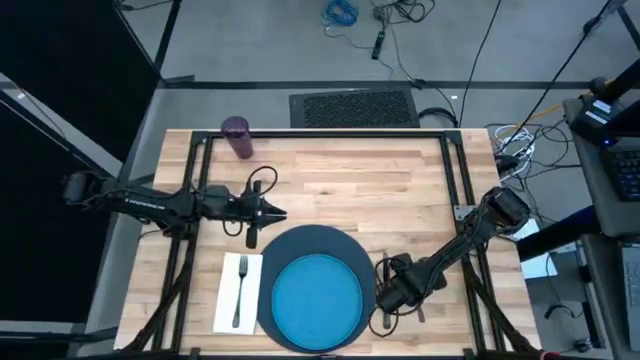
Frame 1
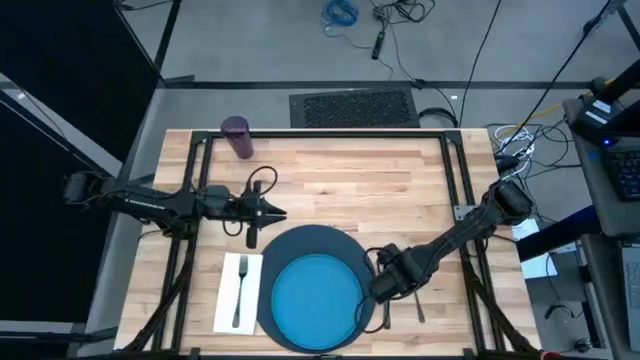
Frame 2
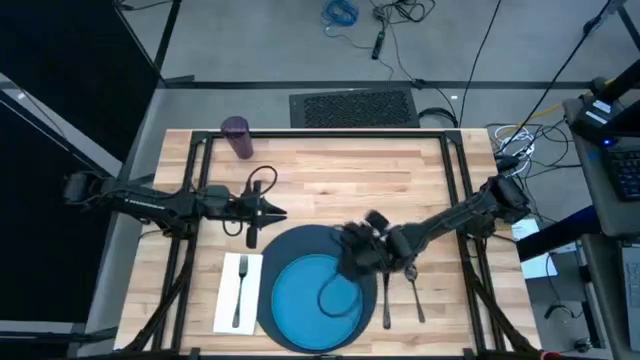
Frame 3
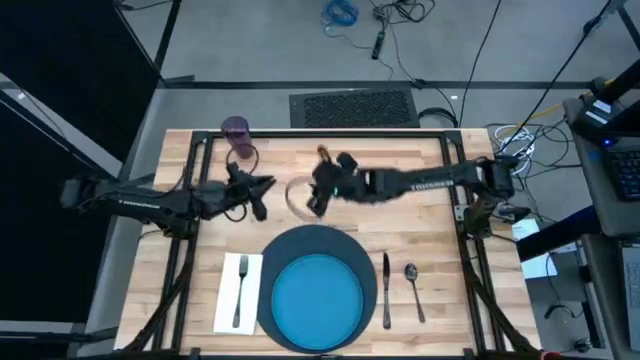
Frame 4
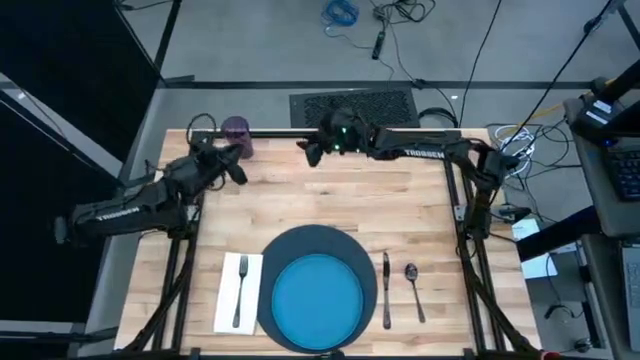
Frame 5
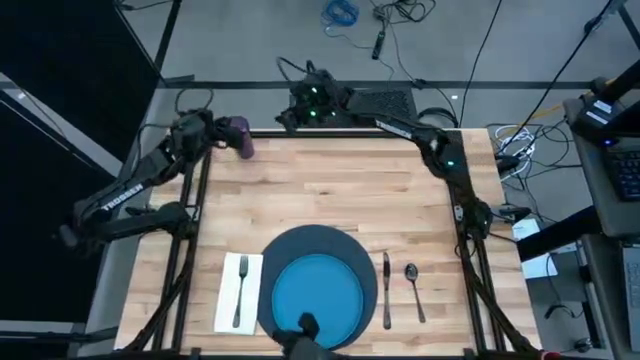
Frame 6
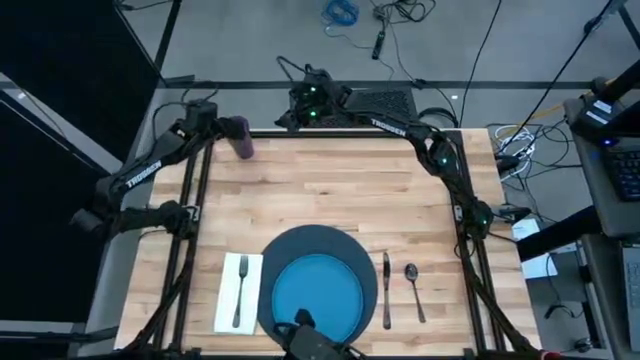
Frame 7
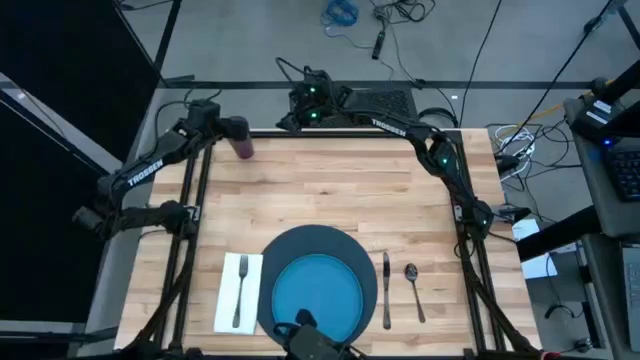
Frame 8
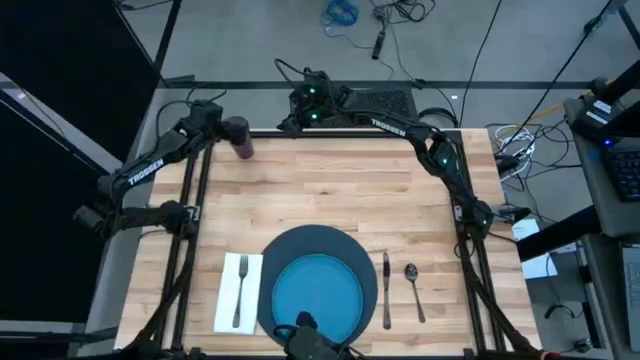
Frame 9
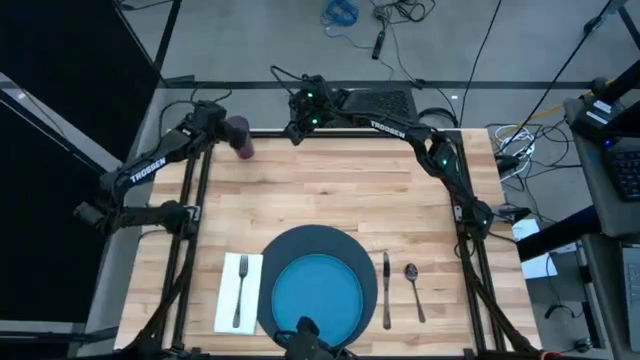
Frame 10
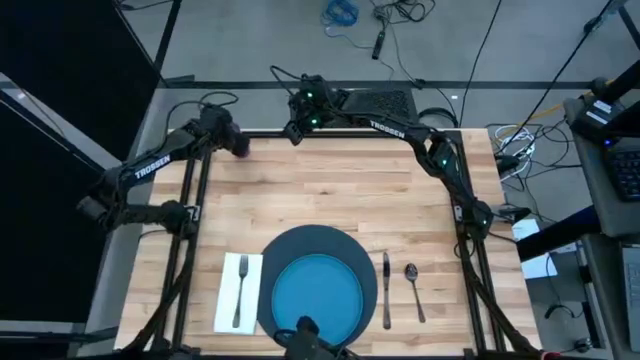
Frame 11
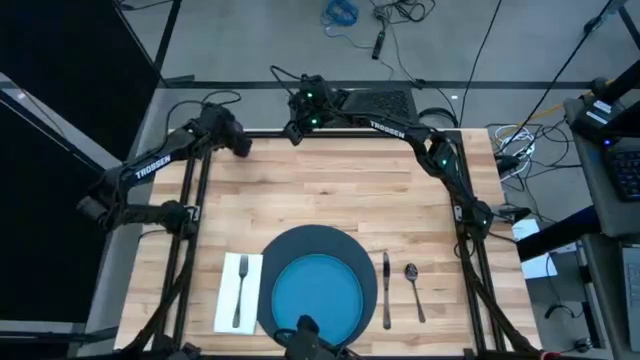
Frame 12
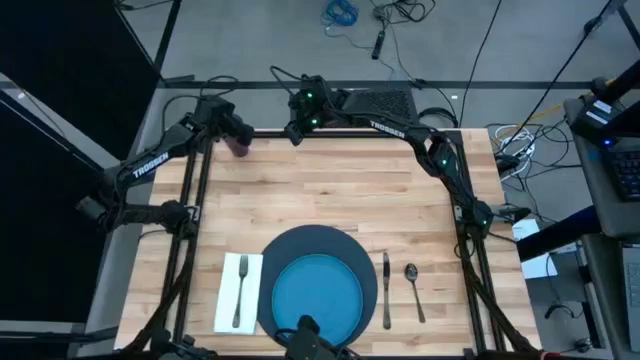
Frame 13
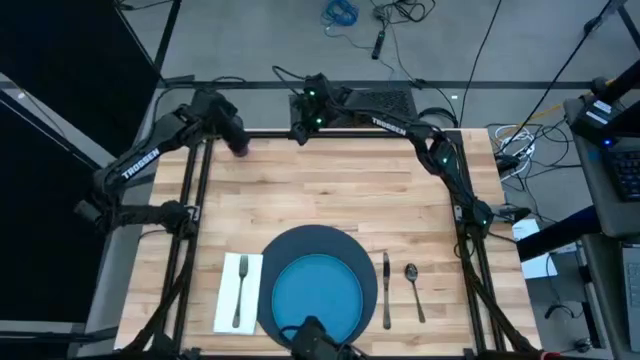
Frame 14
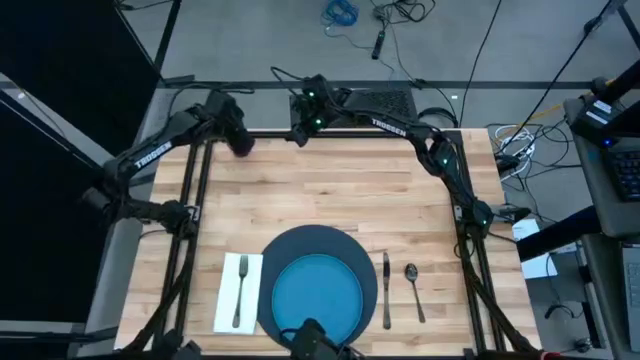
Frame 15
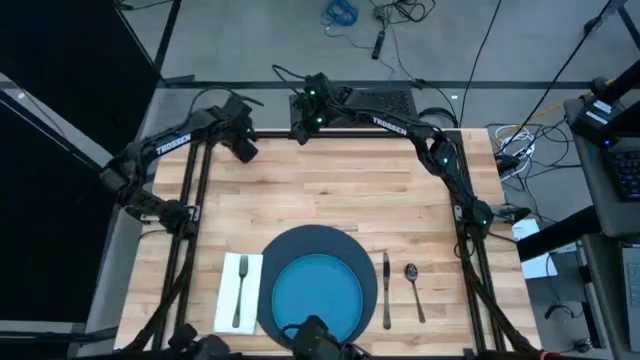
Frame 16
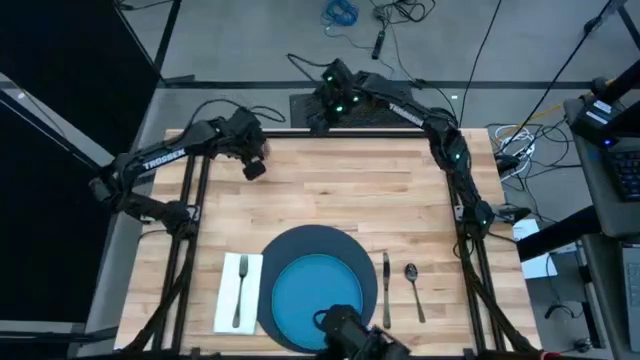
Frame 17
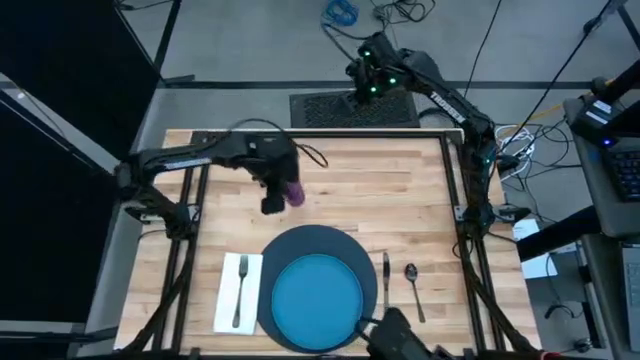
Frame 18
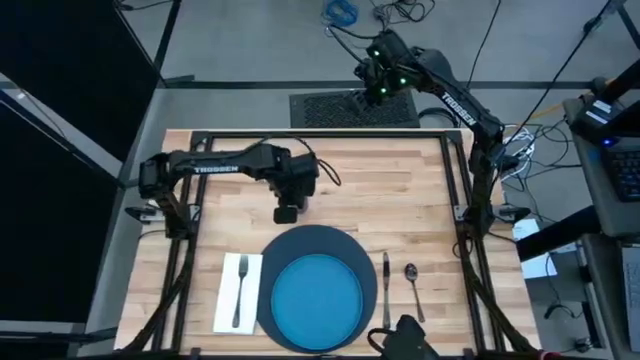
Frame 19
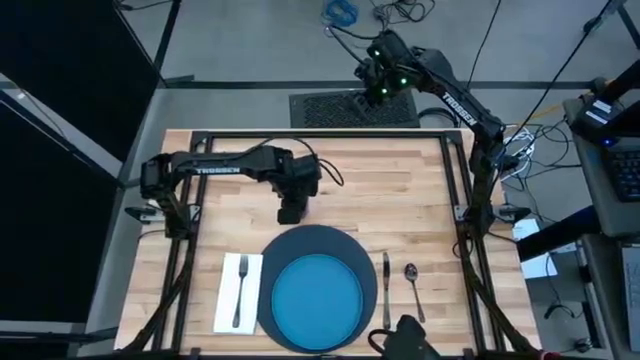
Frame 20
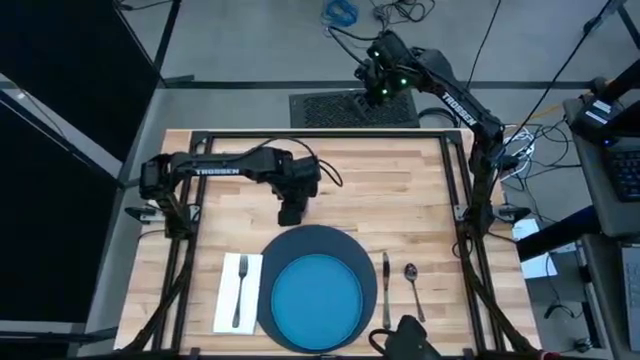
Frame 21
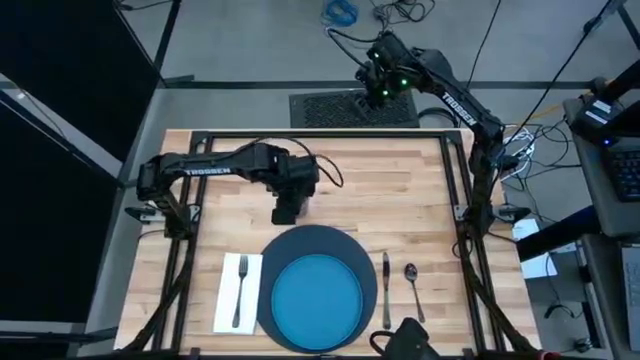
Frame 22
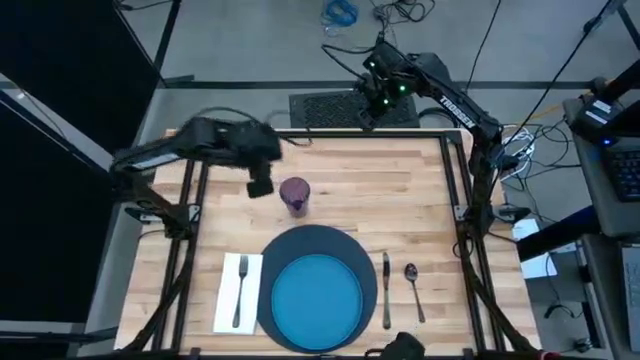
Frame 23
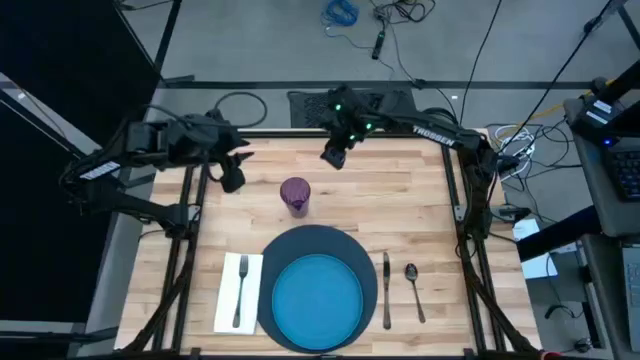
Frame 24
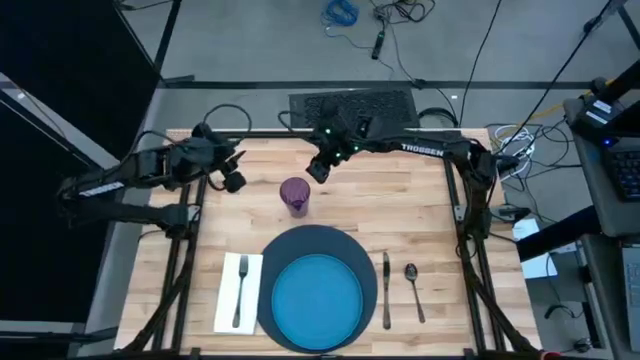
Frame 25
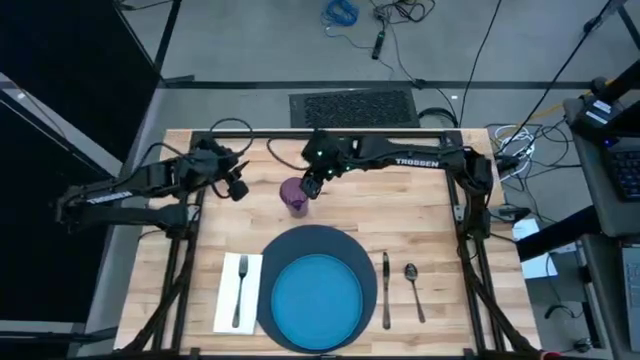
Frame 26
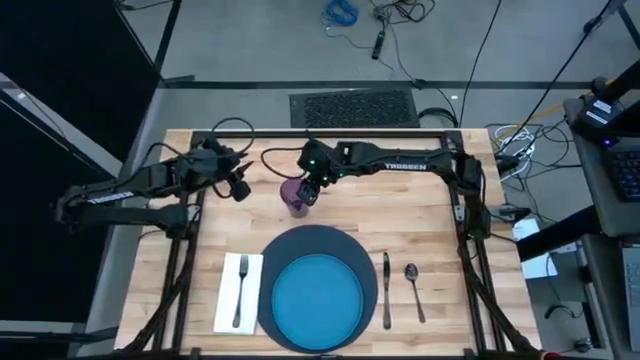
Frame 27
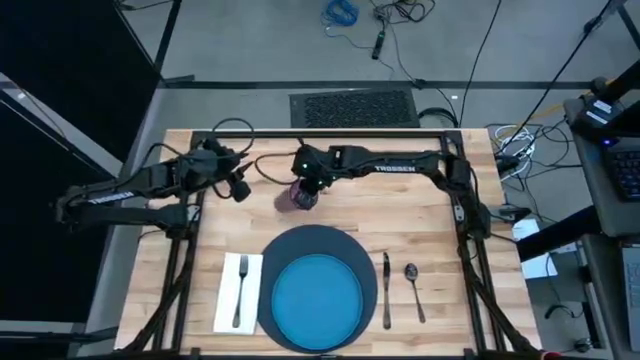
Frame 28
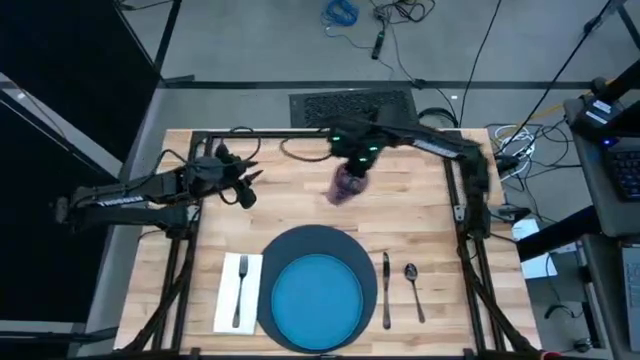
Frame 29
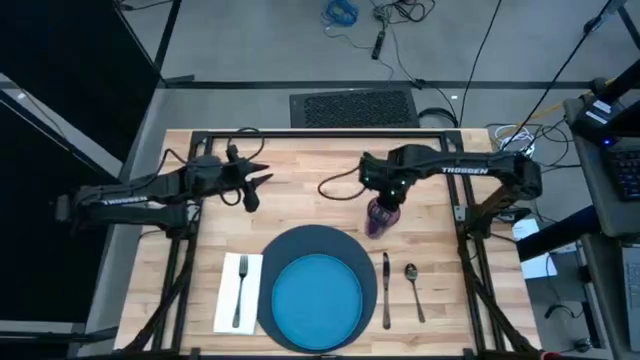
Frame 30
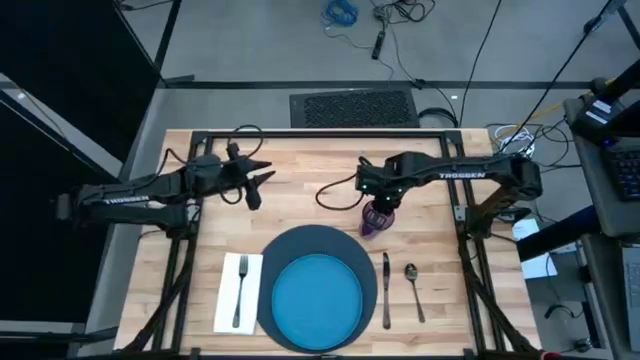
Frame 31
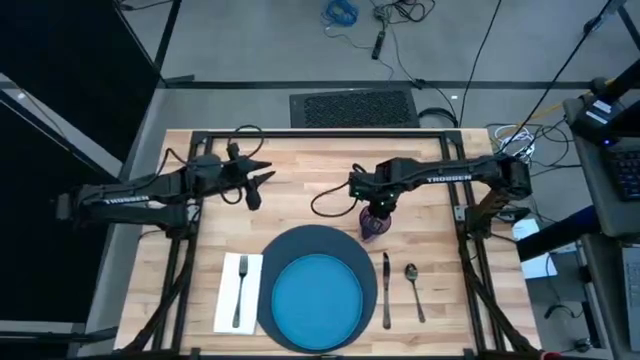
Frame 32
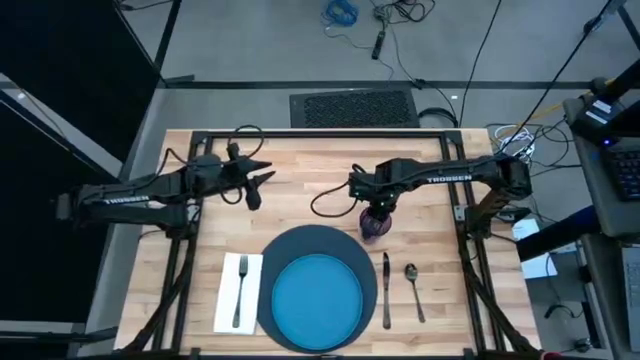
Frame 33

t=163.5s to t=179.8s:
Task: Set table place
Put the violet cup on the middle right of the table

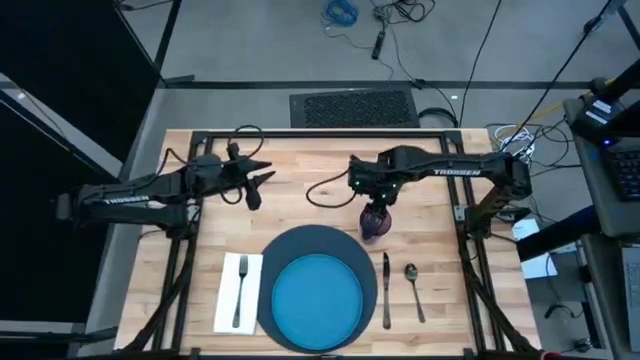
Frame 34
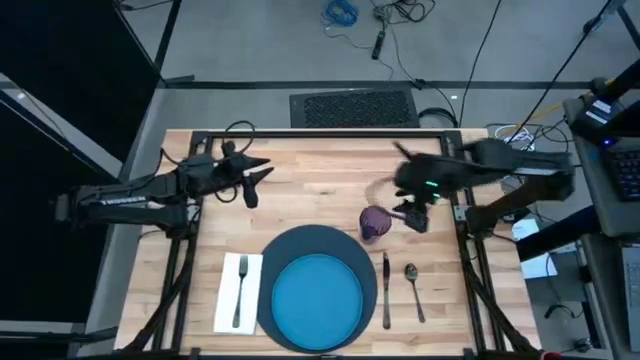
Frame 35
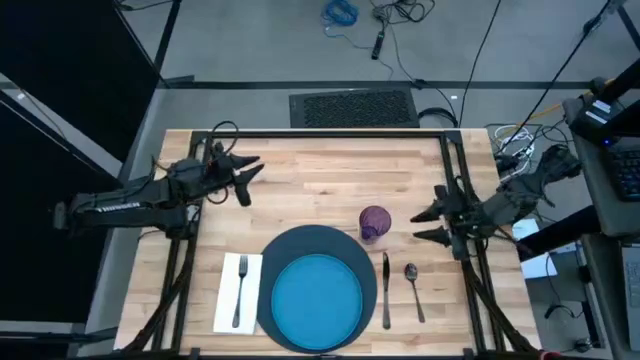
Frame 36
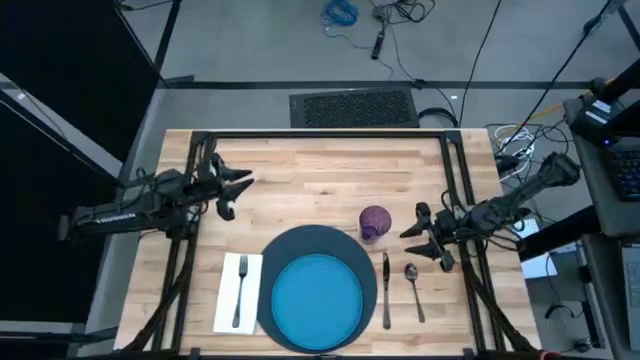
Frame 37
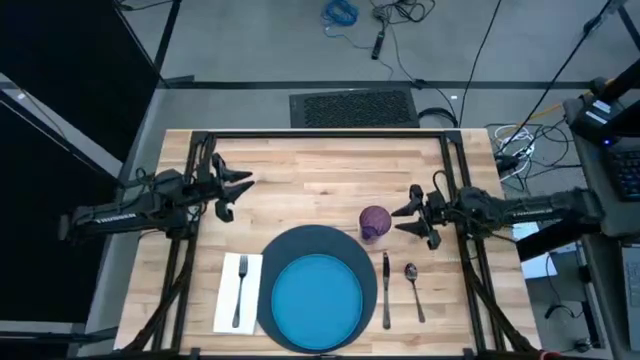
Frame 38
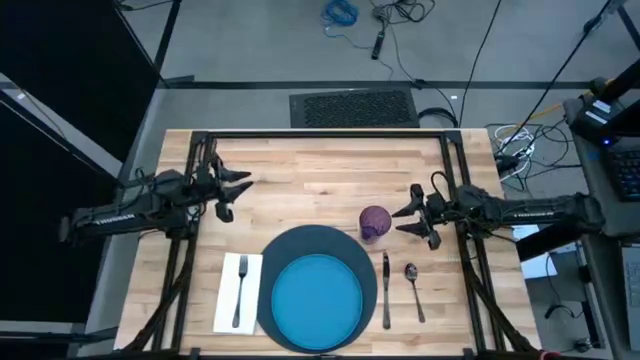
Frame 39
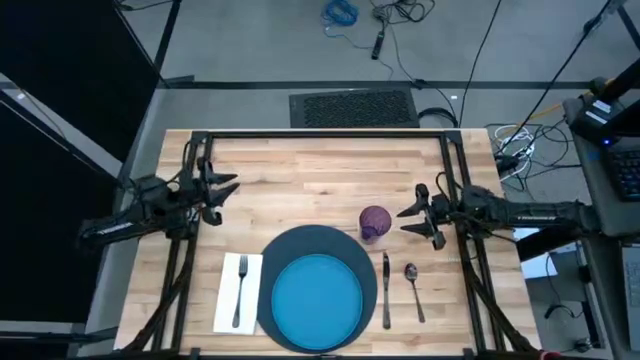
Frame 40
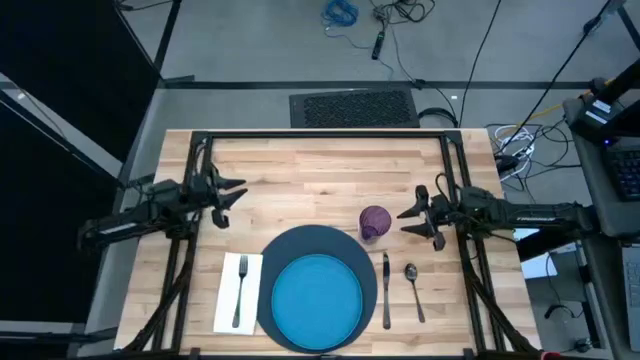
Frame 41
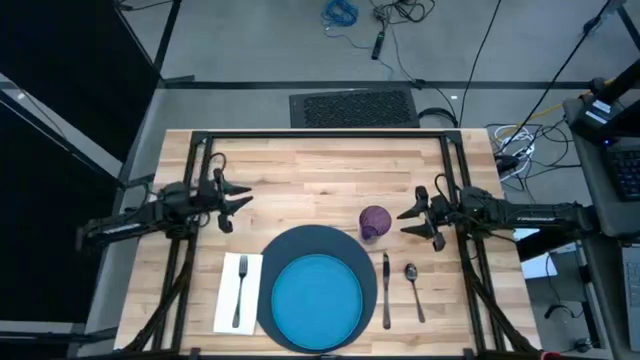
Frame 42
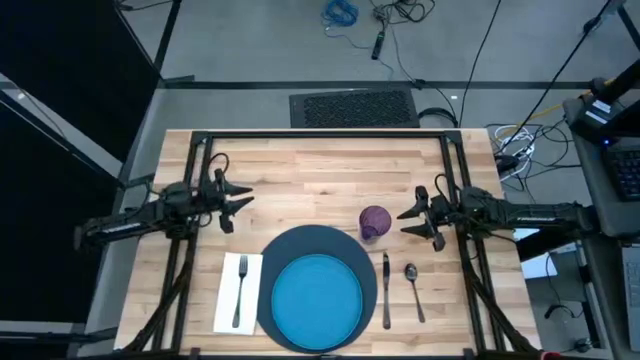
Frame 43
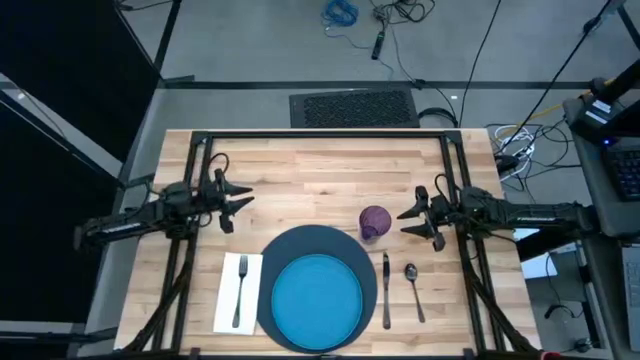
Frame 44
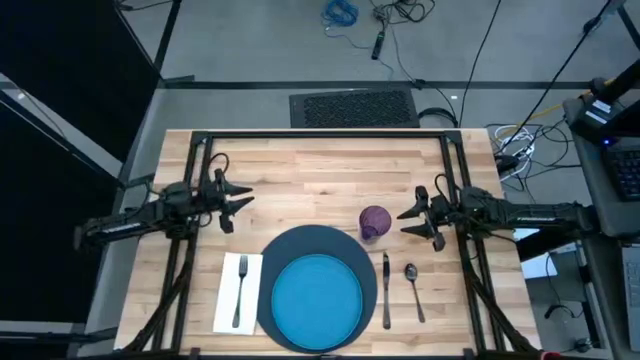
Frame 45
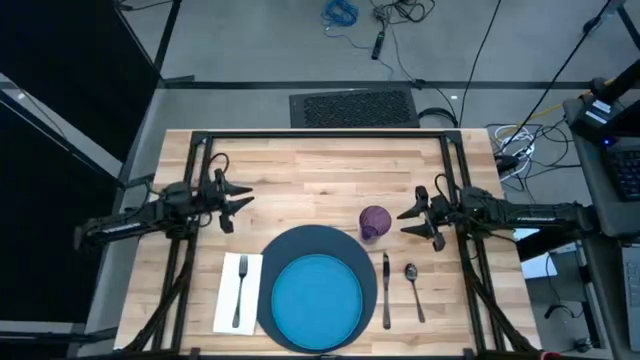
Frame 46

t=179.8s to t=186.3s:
Return to Home Position
